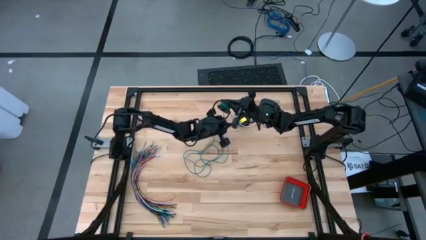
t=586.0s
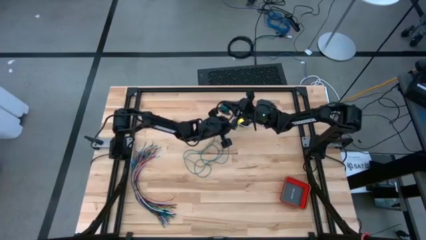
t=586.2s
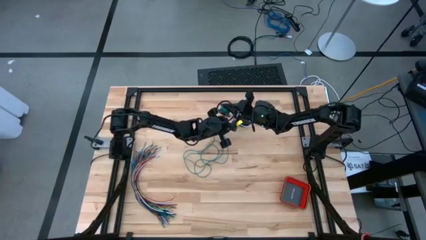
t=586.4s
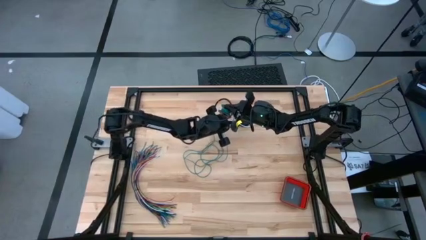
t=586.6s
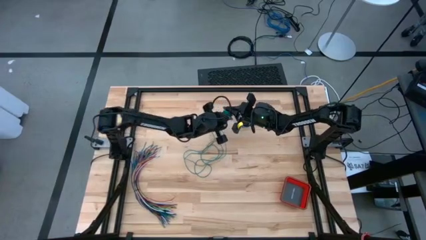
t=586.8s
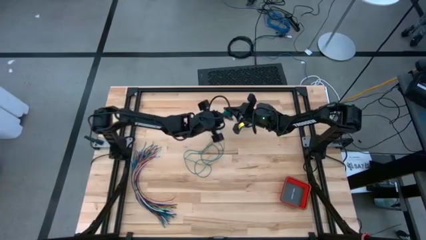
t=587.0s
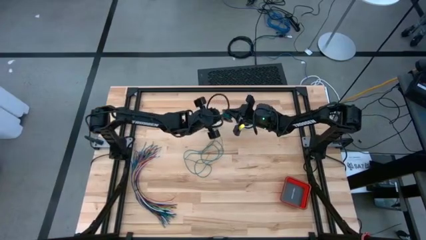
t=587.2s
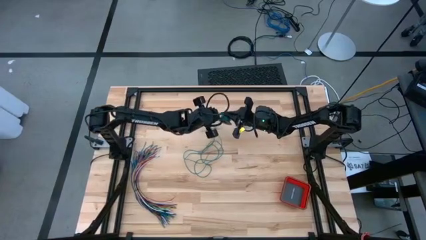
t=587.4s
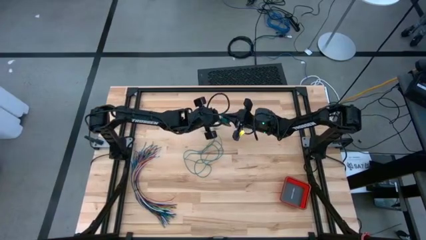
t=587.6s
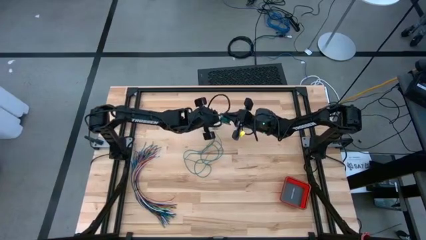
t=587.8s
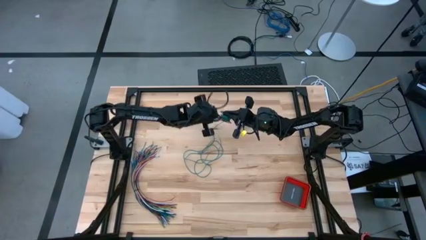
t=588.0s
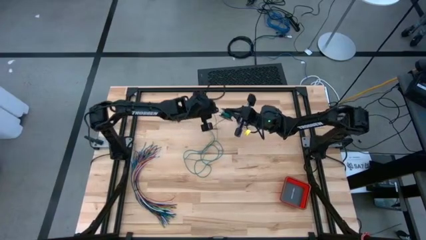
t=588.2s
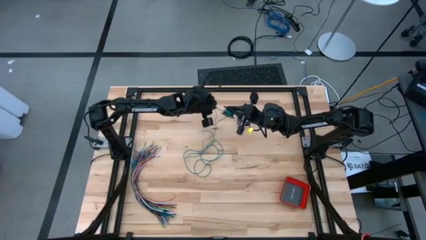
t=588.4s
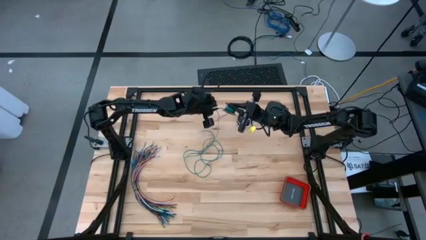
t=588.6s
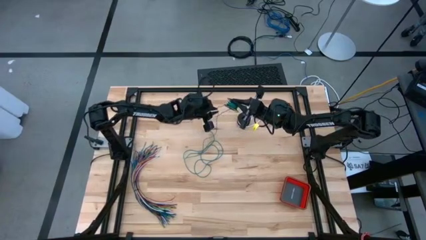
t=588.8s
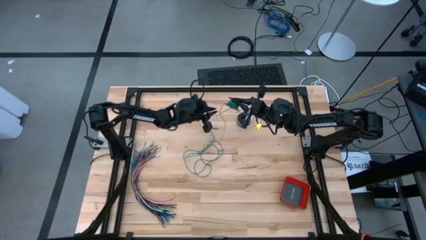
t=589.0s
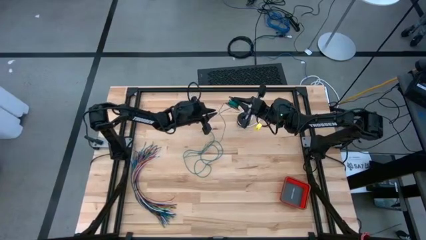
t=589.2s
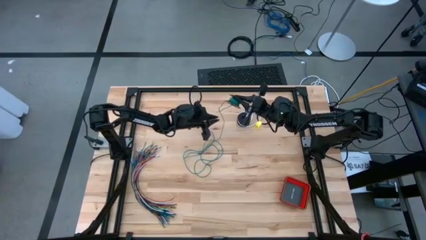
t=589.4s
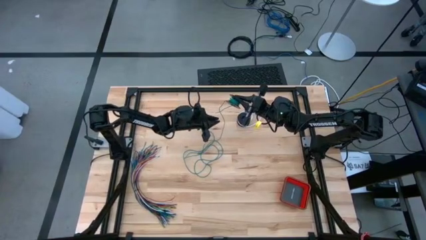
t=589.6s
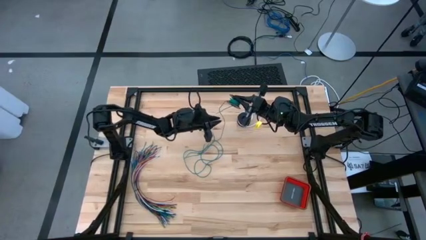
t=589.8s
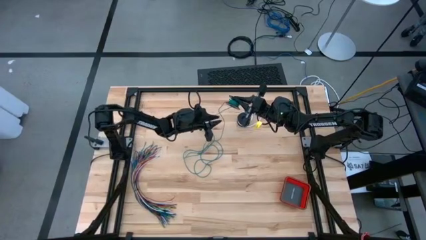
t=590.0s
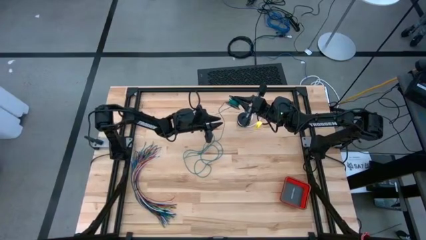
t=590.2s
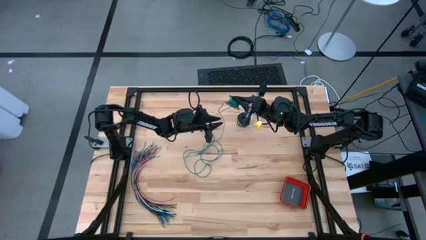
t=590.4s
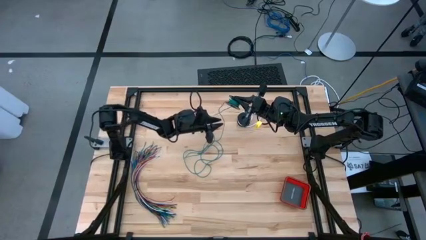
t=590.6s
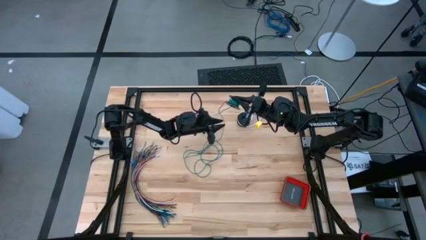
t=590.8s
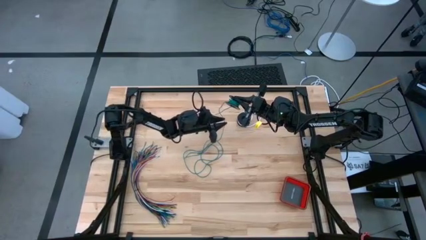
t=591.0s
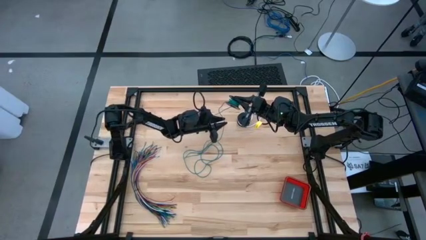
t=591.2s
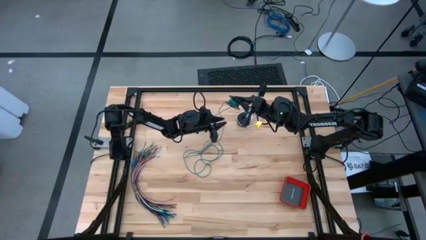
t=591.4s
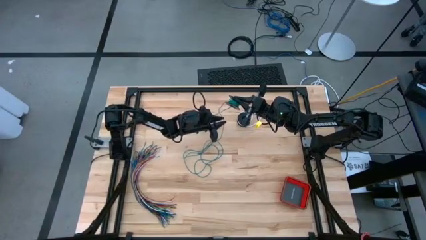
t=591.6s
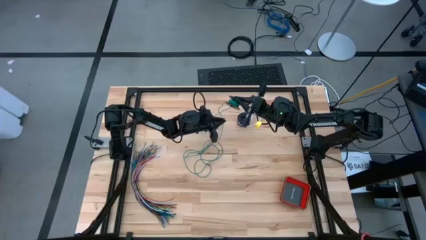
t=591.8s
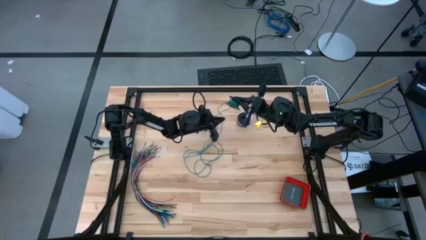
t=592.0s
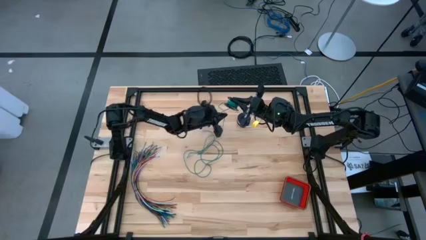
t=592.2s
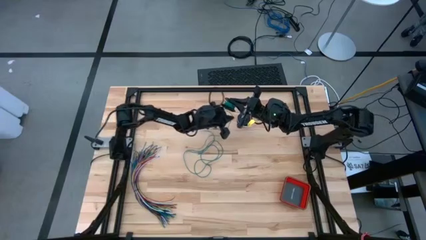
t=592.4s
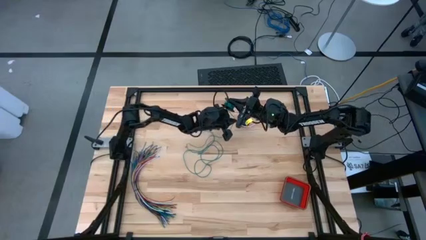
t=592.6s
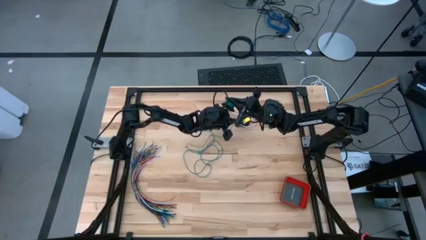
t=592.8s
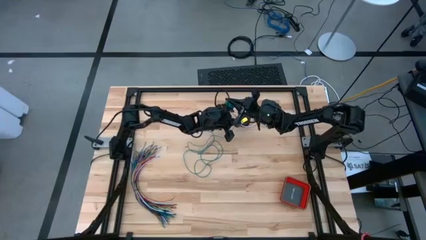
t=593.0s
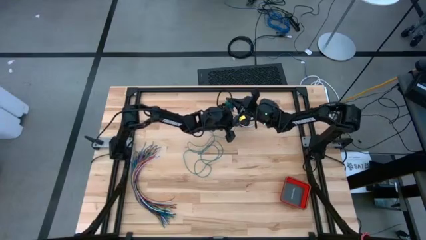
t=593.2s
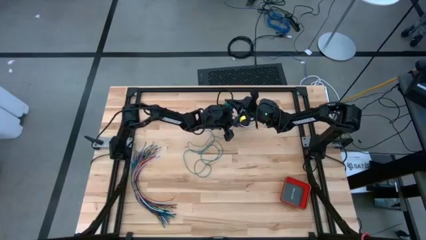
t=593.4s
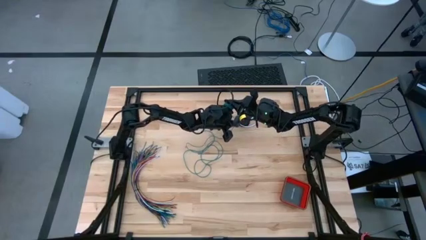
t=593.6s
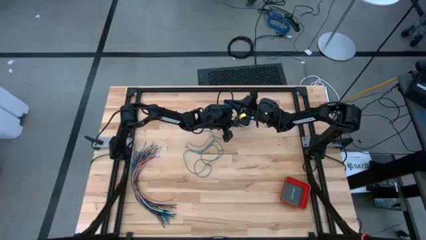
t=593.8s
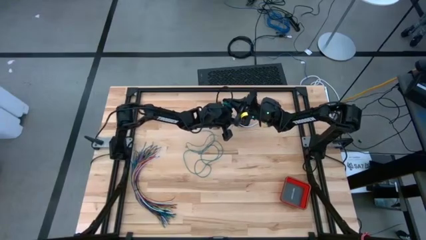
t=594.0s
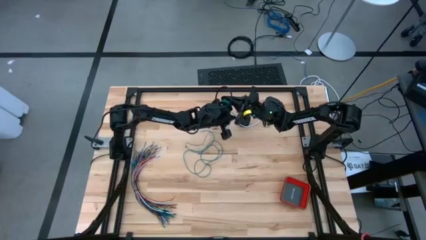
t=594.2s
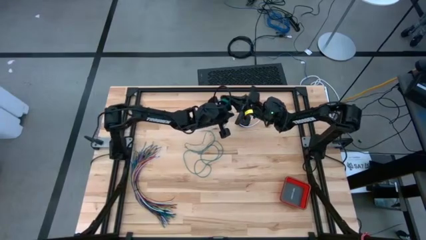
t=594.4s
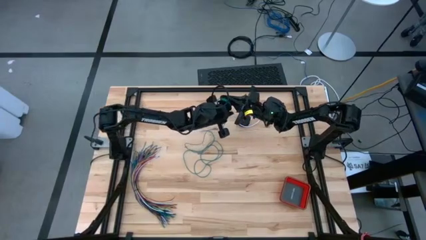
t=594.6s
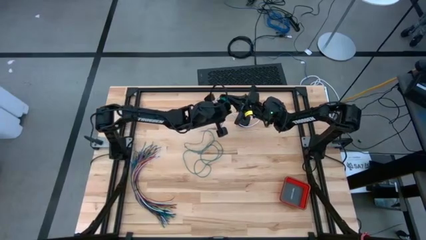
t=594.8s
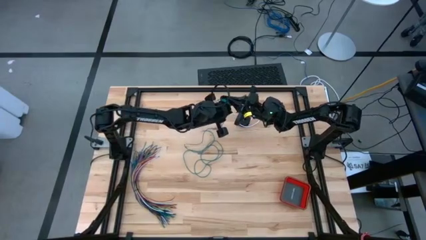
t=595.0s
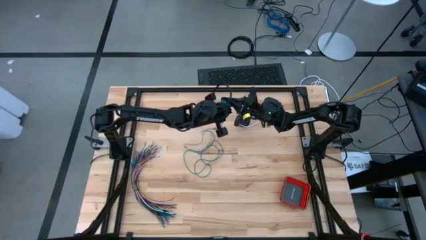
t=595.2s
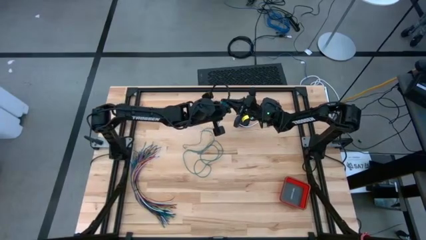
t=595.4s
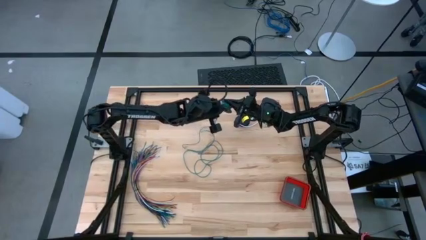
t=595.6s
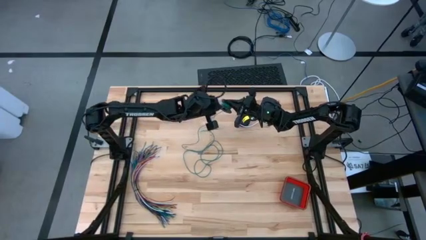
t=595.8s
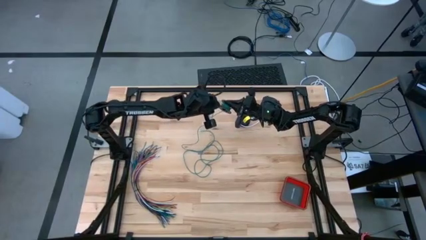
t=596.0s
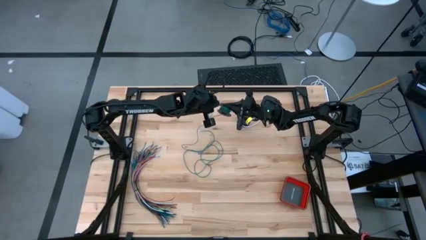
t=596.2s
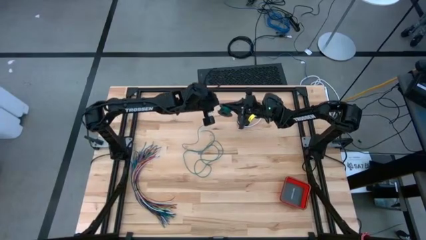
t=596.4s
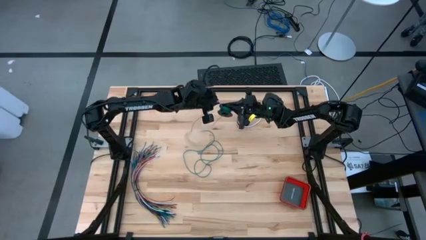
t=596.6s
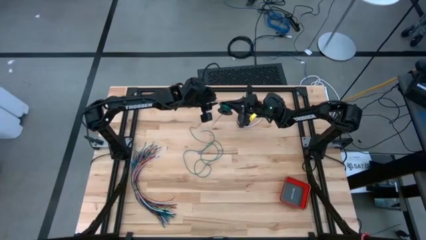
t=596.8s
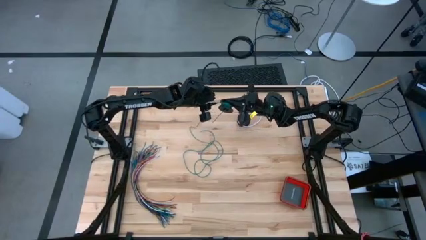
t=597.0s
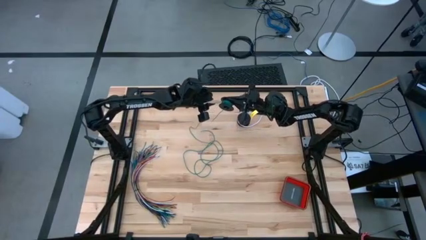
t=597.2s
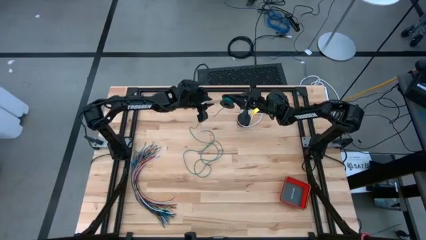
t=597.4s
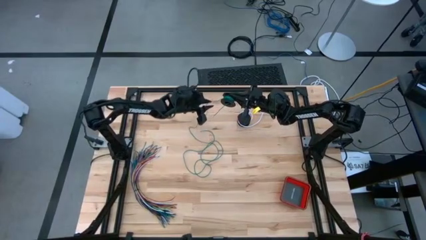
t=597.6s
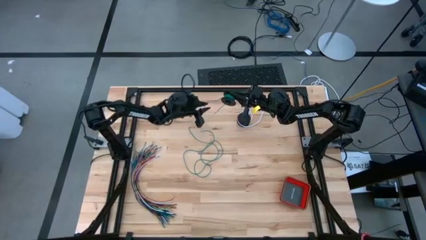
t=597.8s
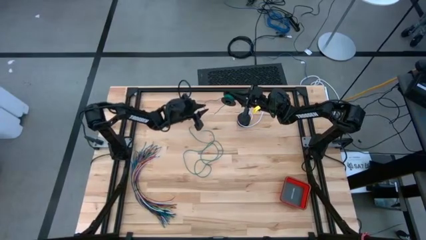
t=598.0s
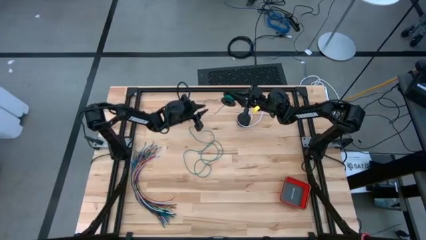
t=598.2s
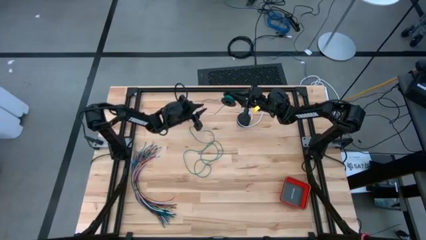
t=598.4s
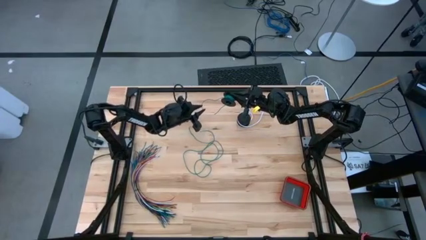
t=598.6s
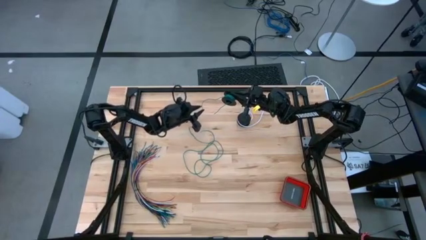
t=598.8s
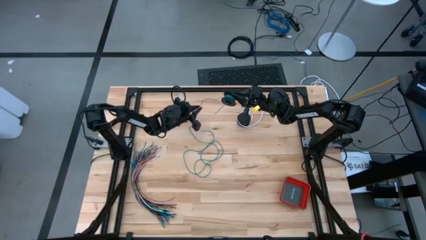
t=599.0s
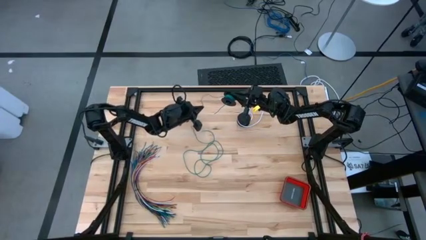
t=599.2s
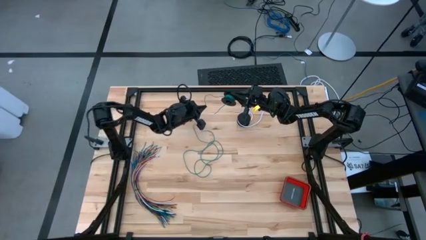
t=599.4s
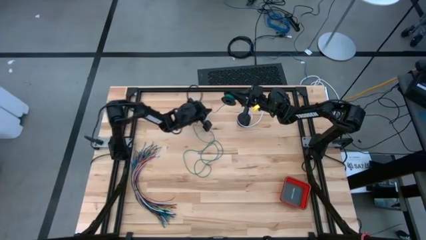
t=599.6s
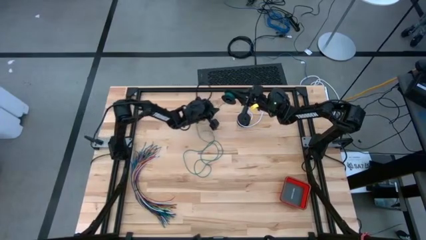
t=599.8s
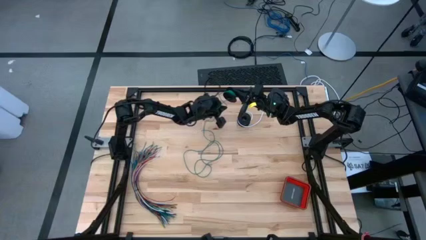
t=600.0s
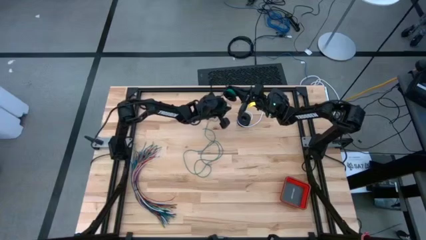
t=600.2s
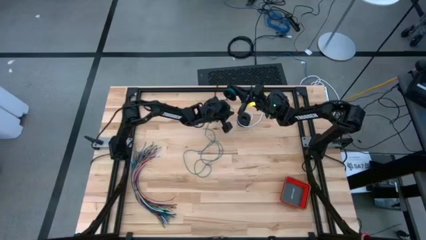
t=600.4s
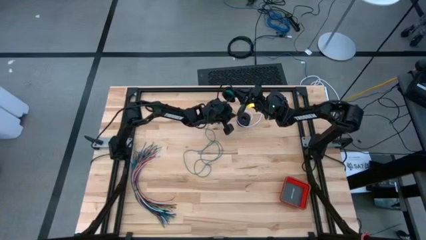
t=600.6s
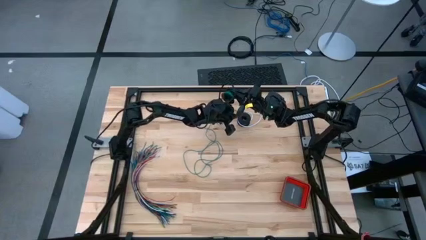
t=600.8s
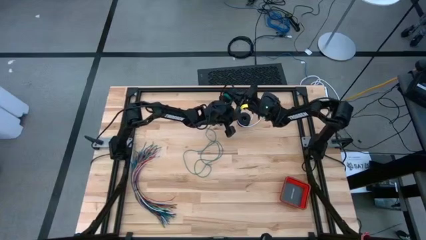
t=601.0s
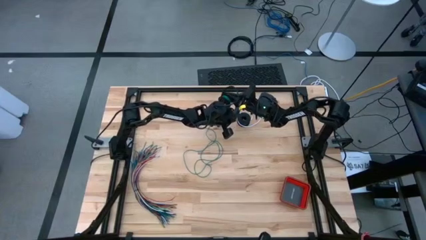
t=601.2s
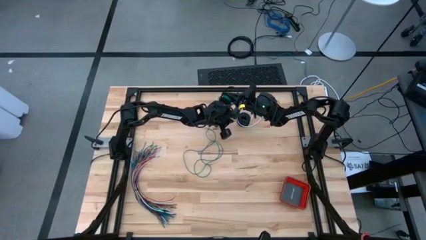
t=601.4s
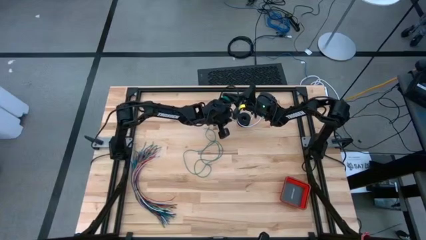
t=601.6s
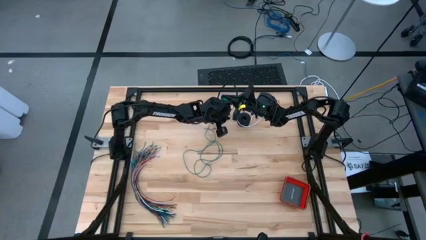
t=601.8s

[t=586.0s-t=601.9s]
Task: Coil cords
Coil the green wire onto the spool
